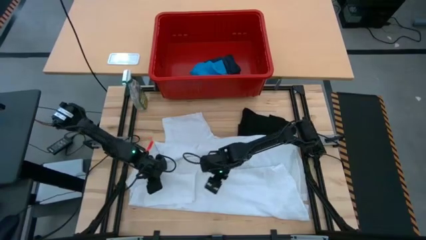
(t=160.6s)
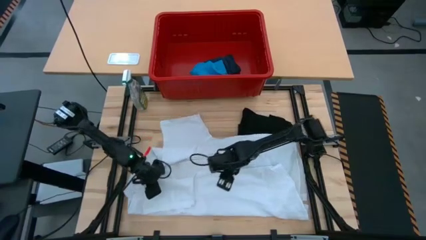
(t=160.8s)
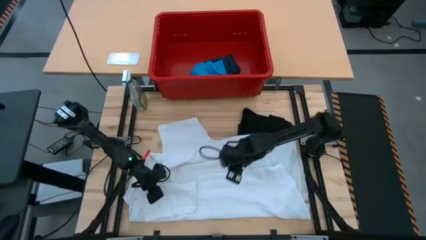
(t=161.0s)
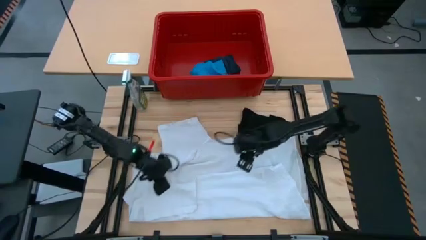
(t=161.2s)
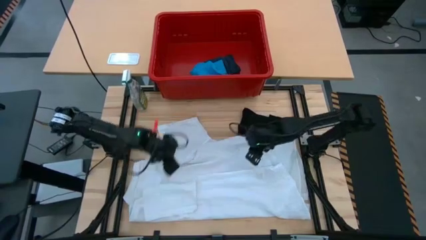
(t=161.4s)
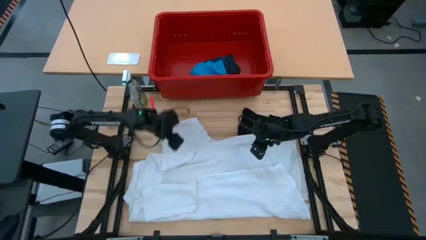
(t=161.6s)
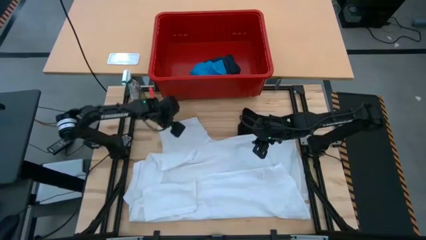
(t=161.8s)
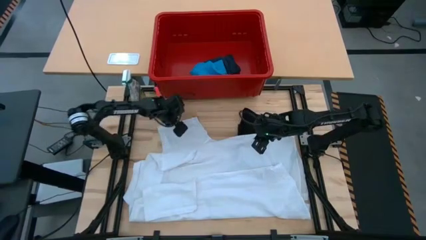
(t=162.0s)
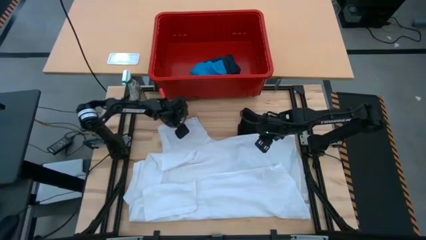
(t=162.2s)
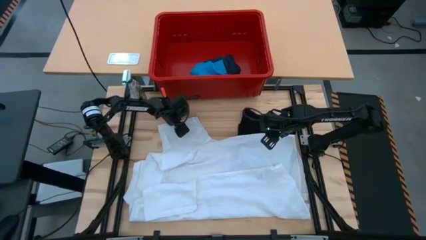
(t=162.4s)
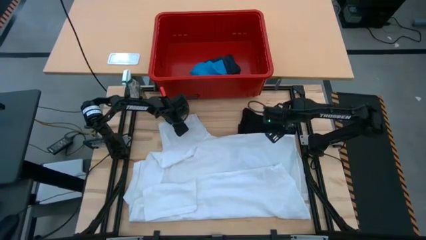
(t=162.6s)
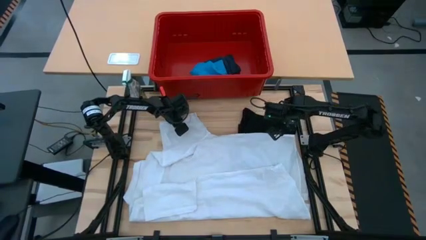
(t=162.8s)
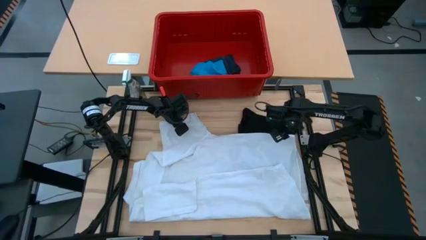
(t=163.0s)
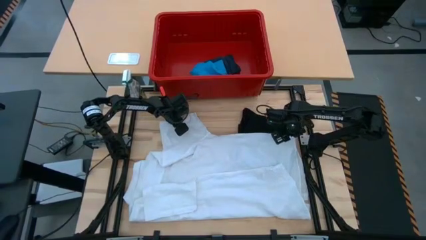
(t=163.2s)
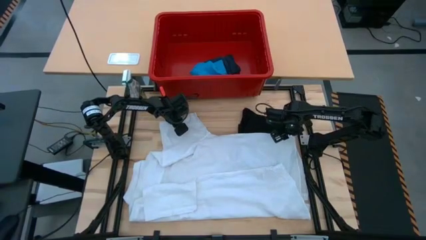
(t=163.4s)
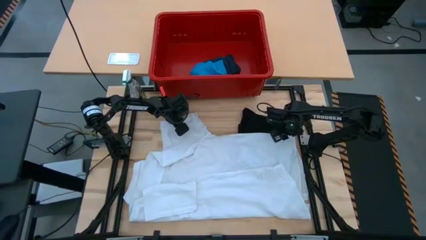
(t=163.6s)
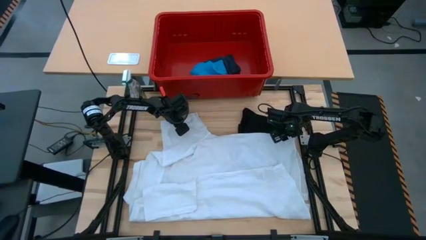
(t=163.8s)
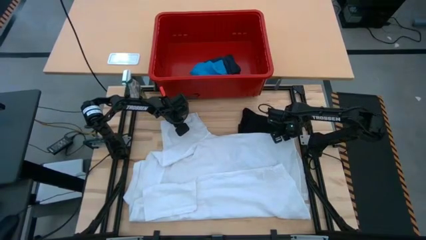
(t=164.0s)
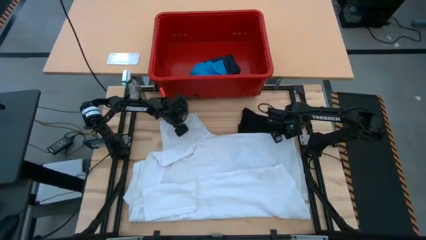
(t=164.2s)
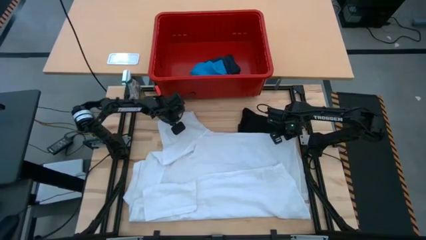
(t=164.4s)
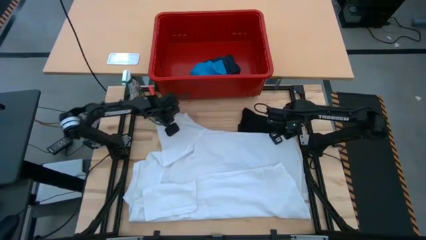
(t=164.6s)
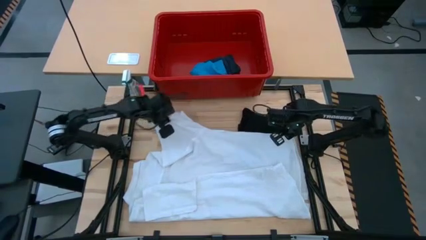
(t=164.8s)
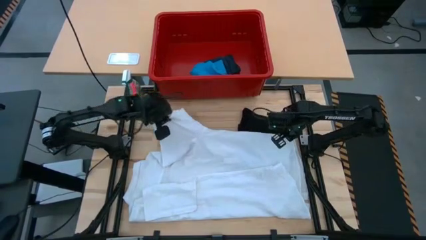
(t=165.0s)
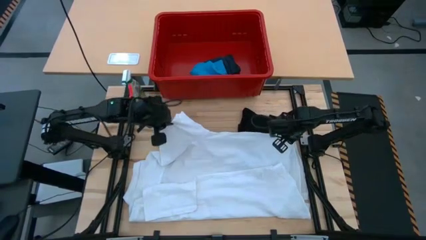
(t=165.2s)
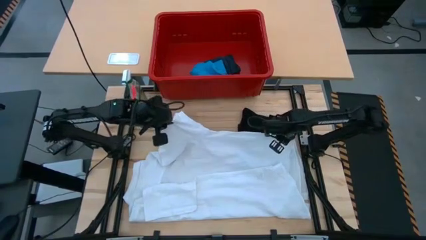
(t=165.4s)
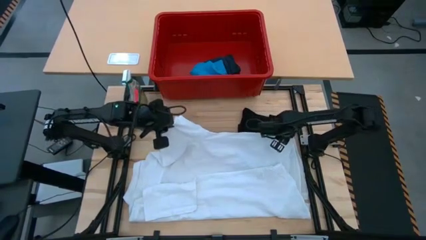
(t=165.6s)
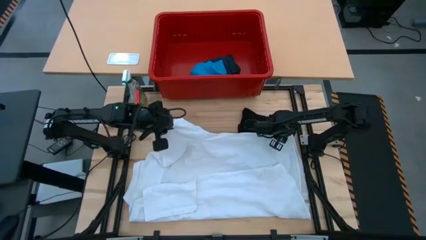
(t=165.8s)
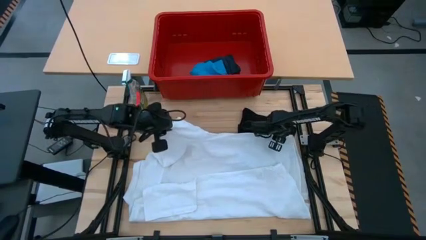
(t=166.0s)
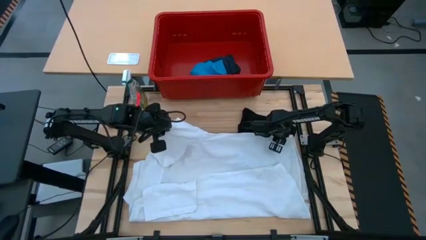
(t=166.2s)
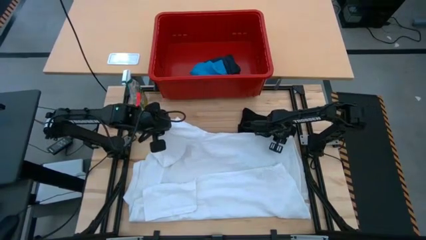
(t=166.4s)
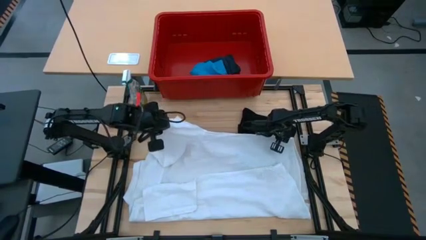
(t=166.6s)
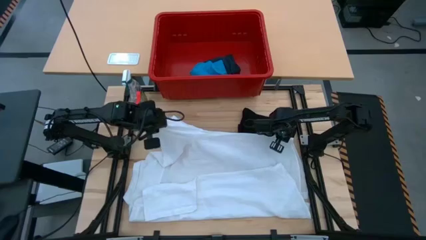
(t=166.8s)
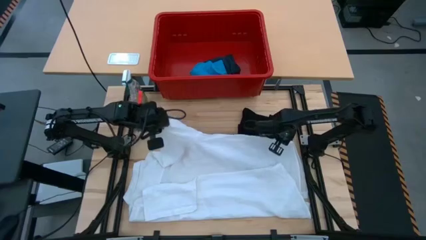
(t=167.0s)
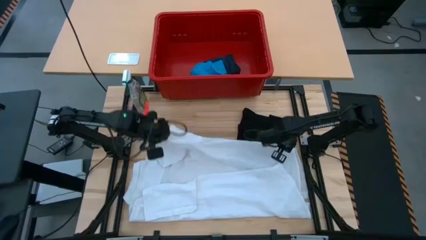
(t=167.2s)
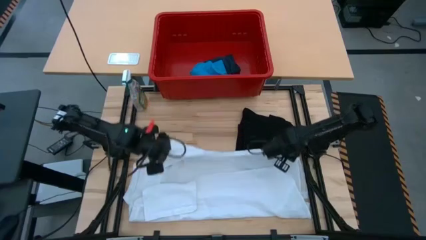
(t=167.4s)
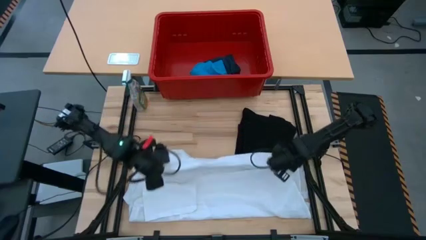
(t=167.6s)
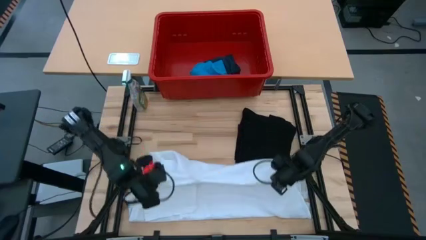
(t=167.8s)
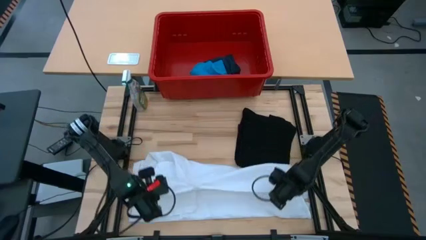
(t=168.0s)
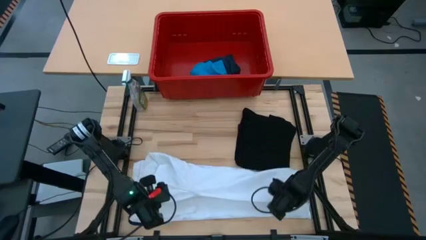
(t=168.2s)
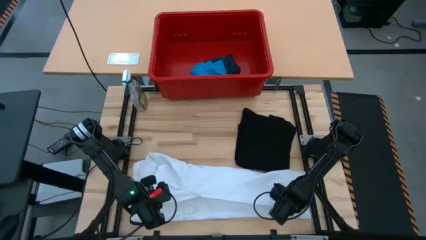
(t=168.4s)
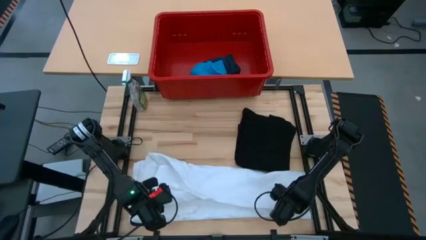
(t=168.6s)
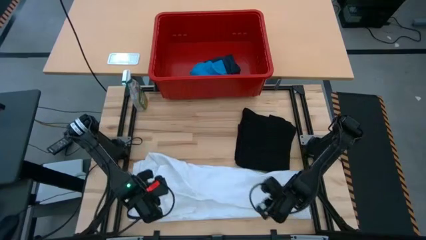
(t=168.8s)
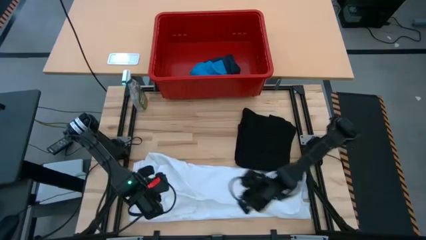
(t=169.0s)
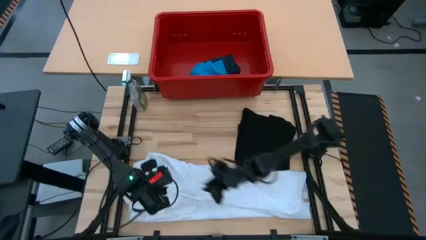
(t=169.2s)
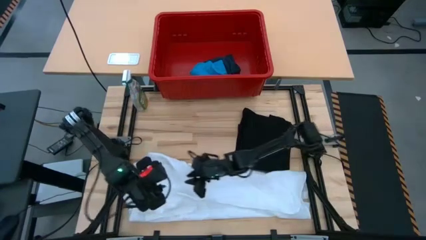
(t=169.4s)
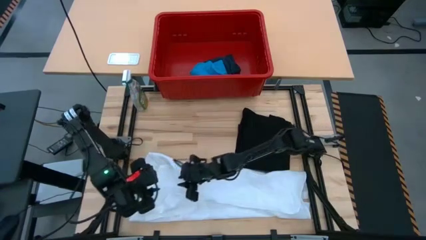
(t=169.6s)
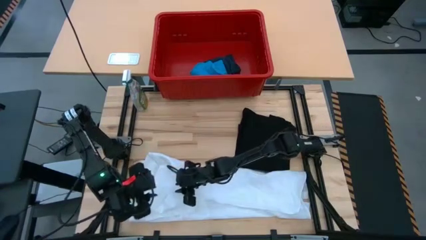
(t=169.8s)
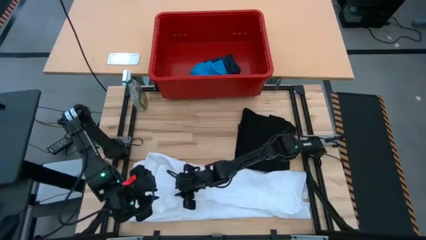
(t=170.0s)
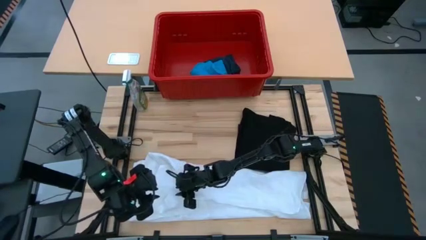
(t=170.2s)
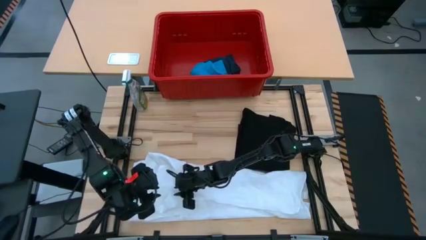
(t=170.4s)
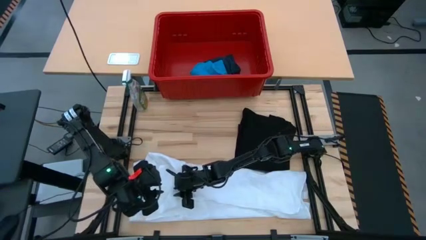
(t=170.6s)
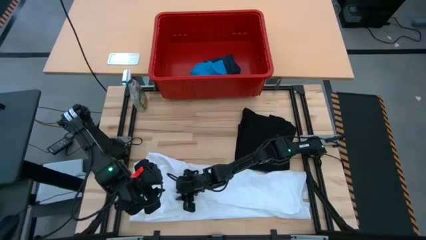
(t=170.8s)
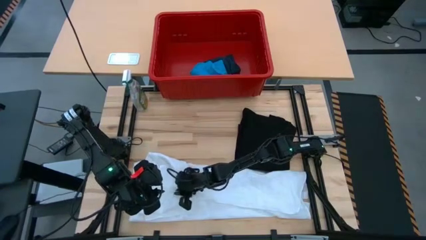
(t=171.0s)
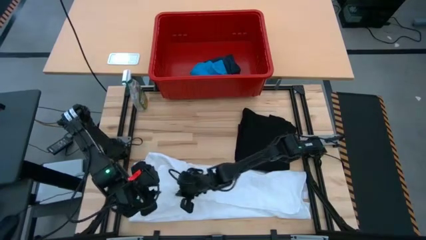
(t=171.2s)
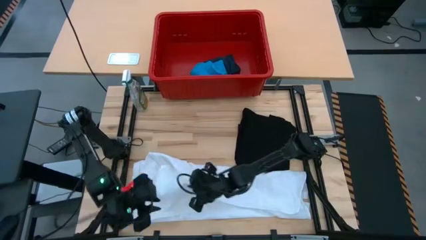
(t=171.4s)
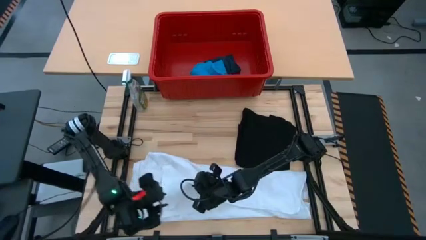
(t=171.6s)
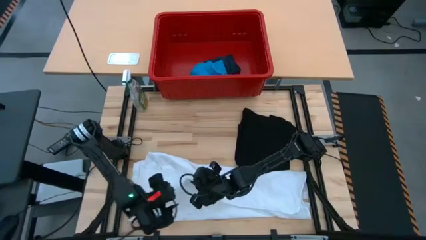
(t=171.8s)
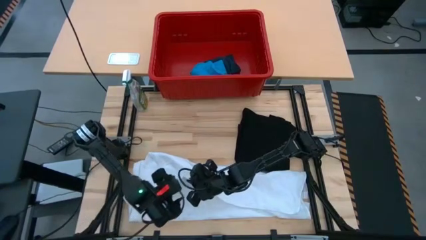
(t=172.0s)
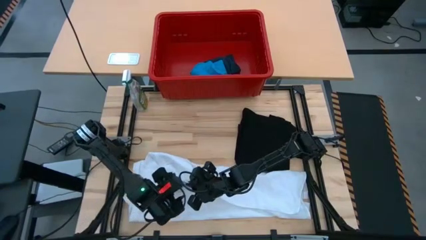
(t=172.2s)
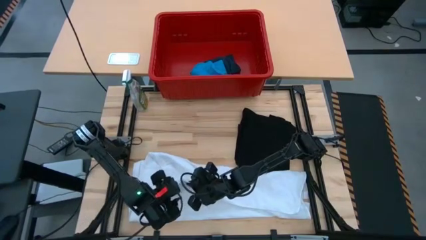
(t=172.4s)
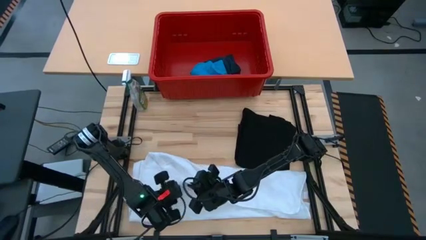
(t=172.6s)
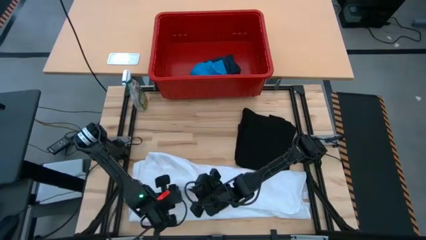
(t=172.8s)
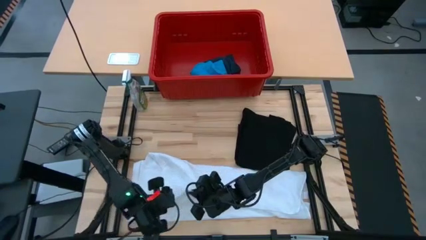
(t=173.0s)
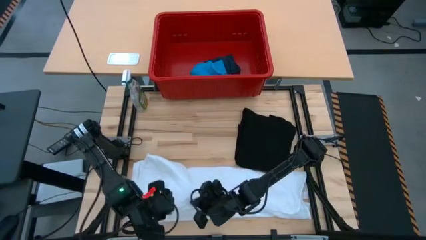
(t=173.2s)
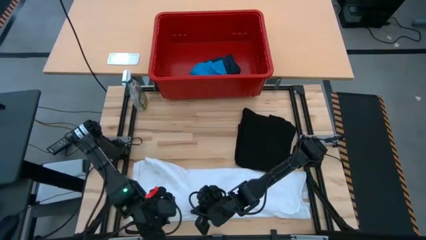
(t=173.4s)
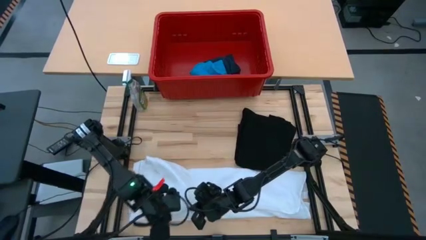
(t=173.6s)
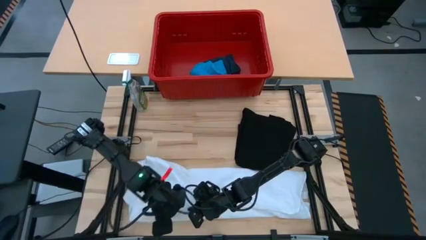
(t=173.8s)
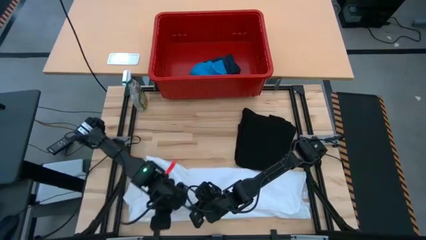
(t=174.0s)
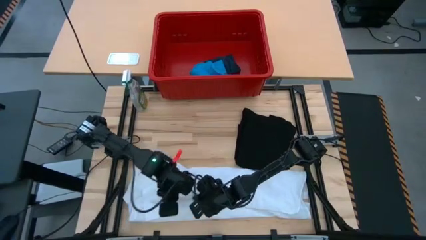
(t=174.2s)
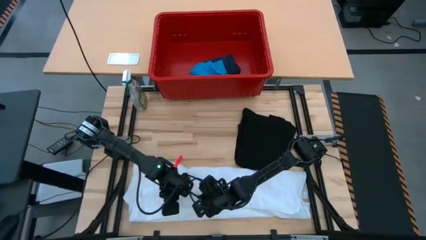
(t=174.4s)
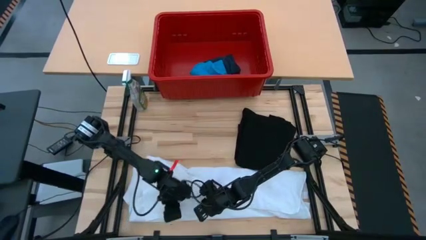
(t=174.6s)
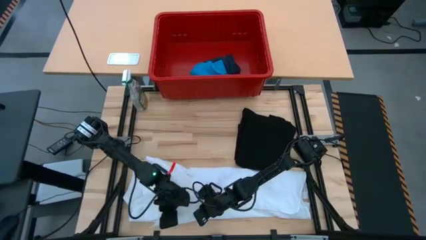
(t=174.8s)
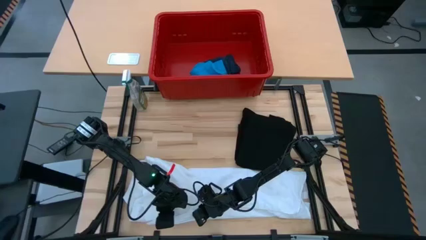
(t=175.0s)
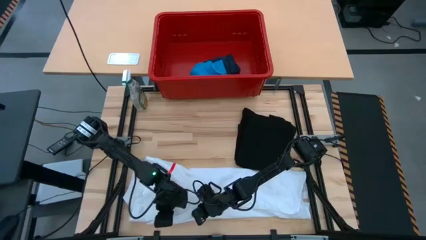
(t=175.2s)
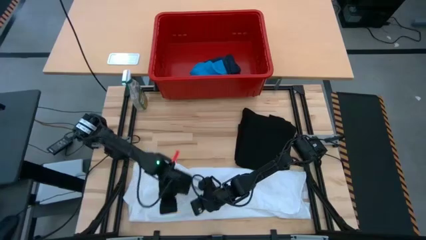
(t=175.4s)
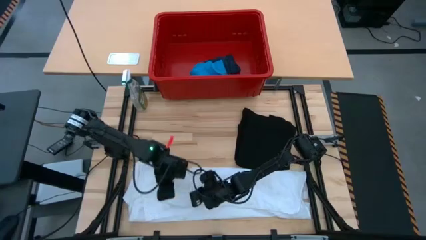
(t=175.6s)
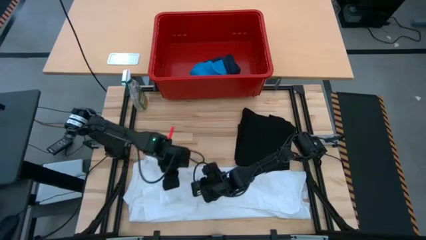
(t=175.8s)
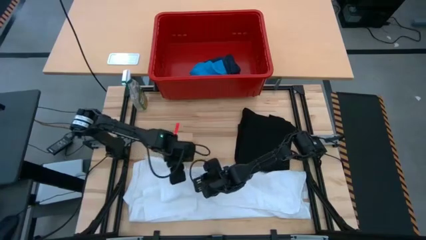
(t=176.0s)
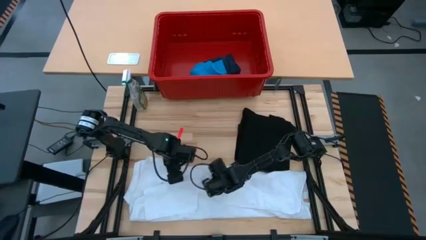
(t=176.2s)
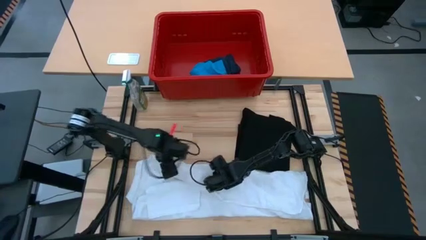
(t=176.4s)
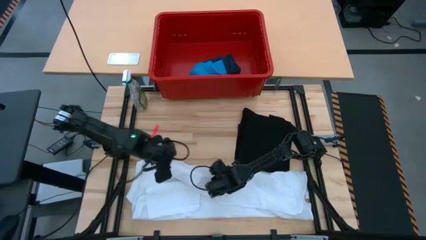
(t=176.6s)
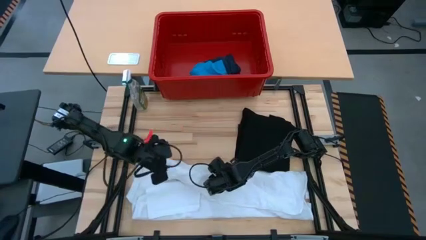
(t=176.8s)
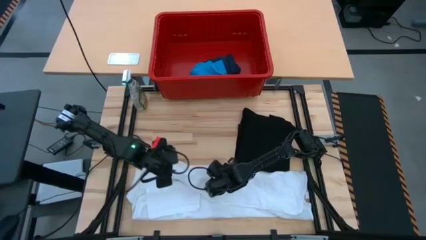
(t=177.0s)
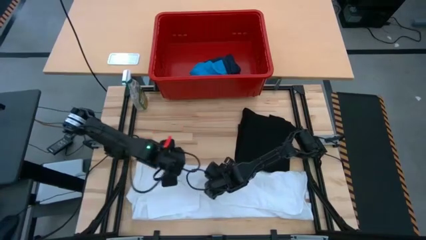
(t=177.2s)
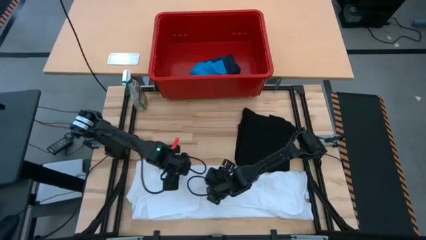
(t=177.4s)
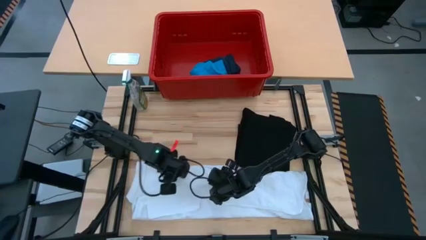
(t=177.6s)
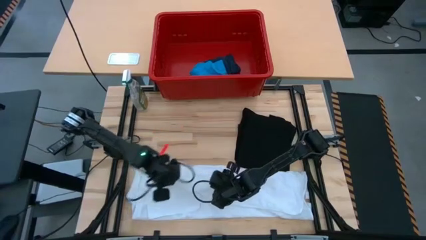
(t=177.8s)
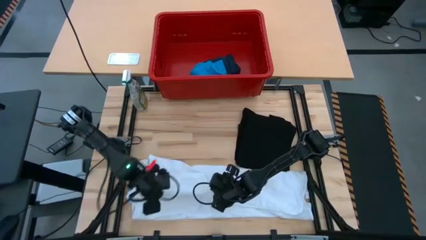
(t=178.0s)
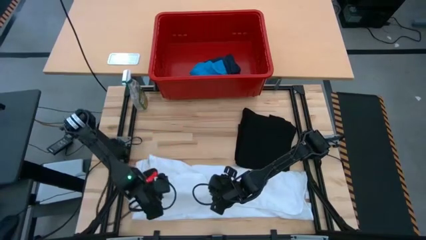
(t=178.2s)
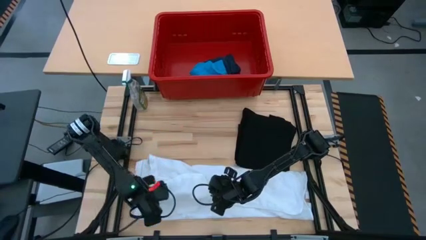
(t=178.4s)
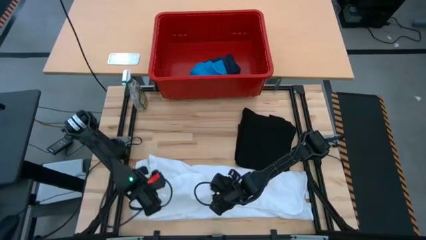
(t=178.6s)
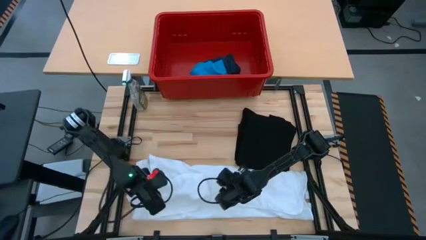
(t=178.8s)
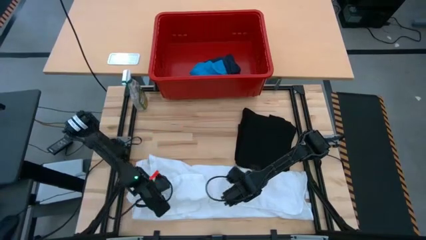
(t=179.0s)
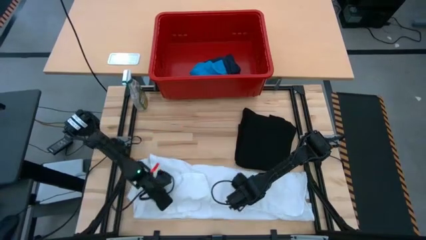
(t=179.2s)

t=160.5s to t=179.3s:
Task: Fold laundry
Fold the white polo shirt on the table
